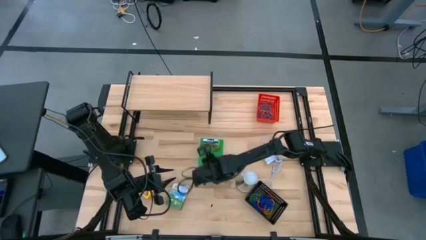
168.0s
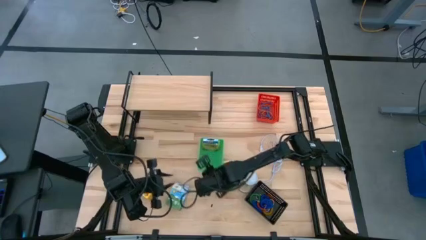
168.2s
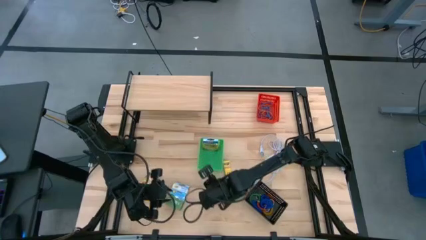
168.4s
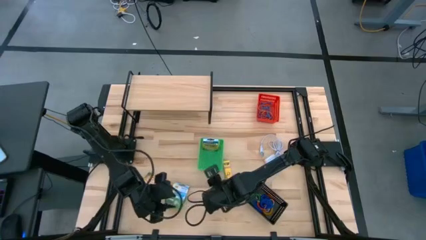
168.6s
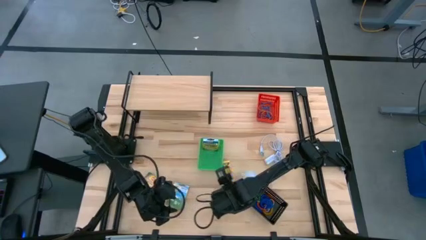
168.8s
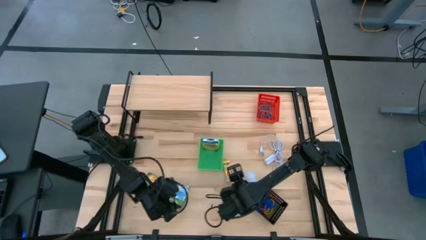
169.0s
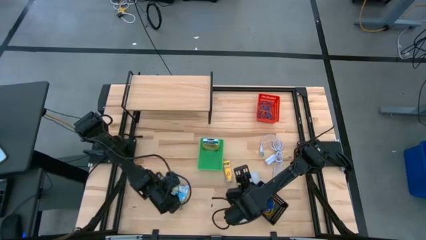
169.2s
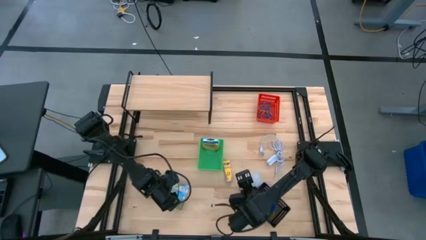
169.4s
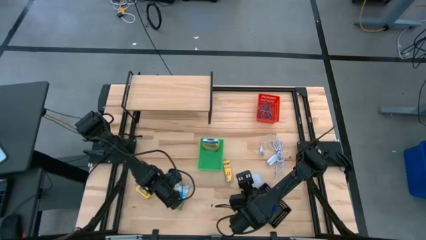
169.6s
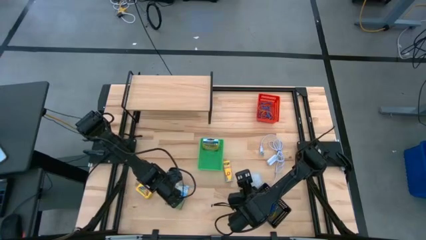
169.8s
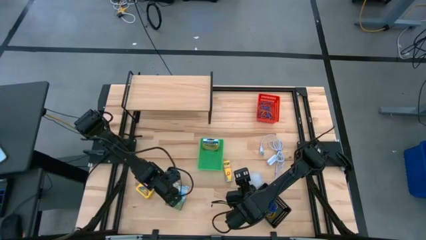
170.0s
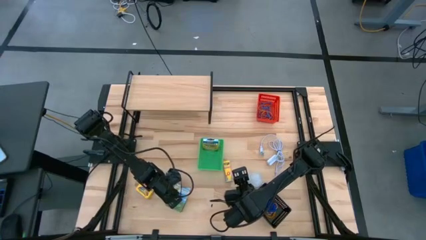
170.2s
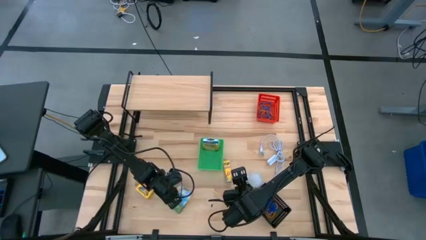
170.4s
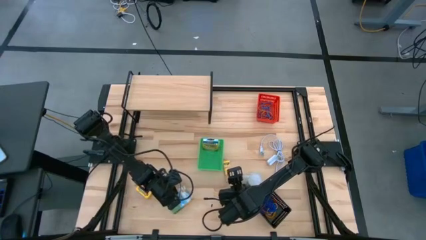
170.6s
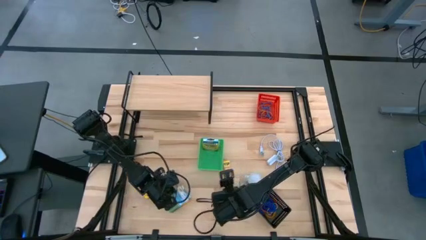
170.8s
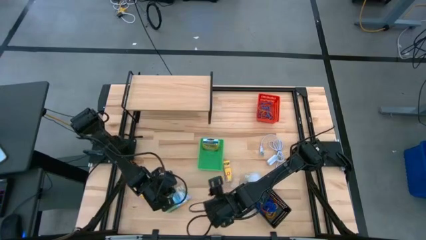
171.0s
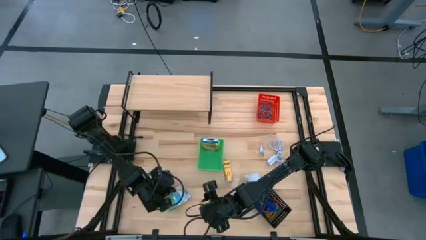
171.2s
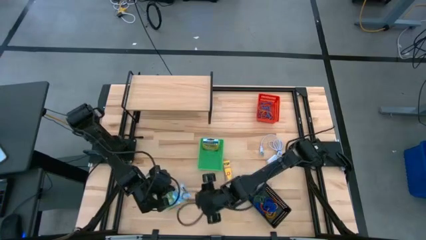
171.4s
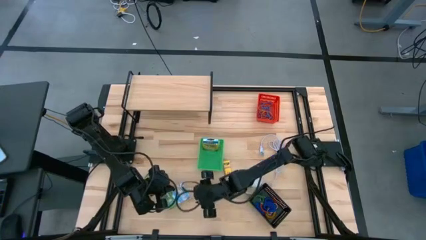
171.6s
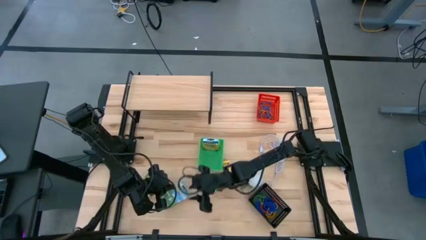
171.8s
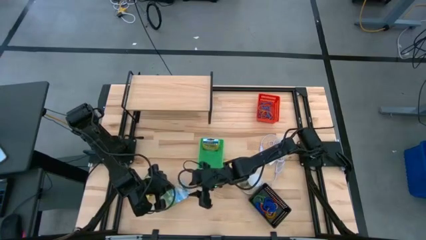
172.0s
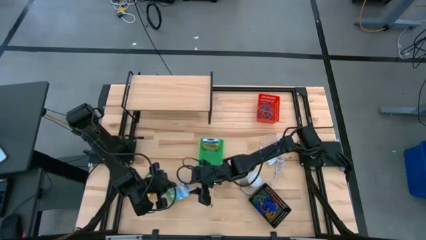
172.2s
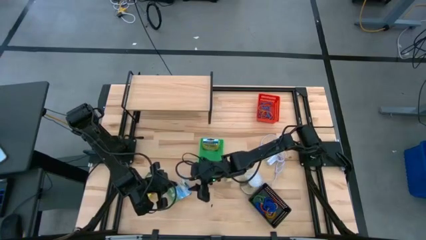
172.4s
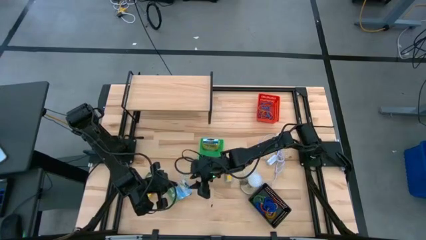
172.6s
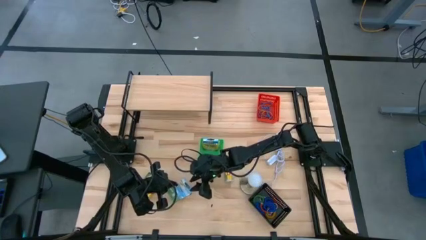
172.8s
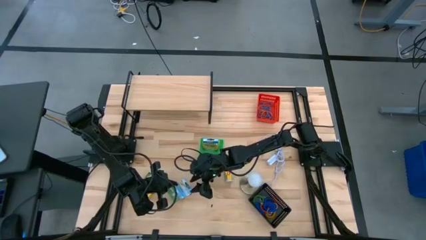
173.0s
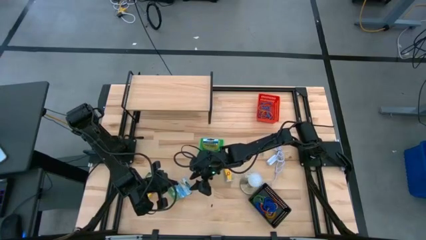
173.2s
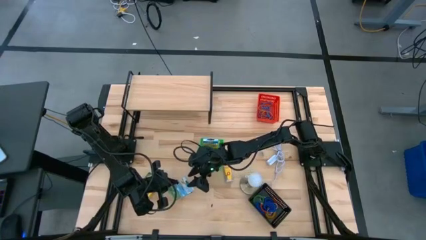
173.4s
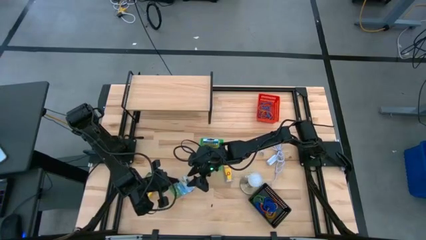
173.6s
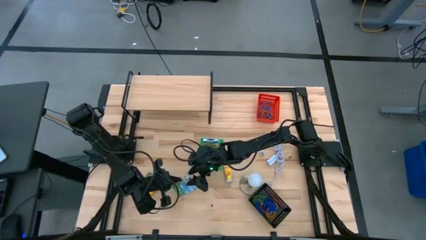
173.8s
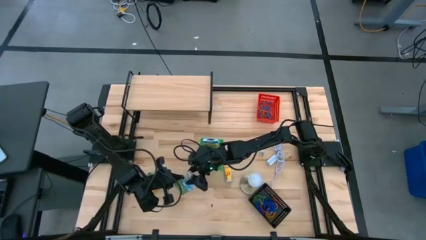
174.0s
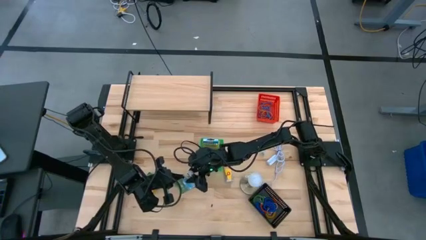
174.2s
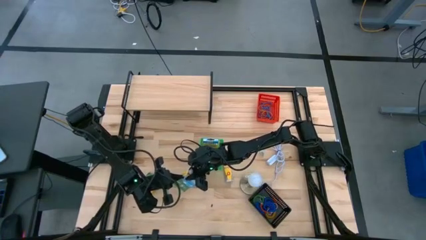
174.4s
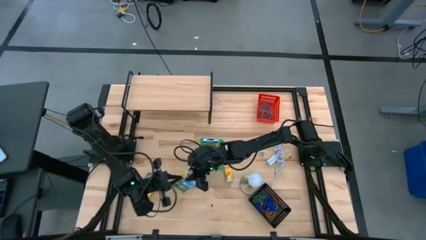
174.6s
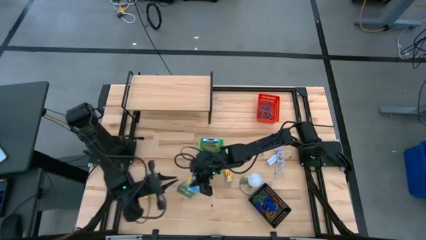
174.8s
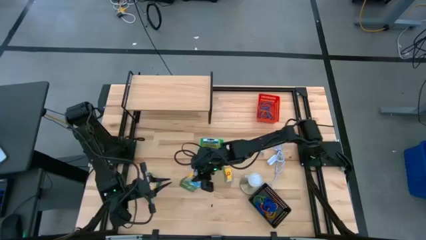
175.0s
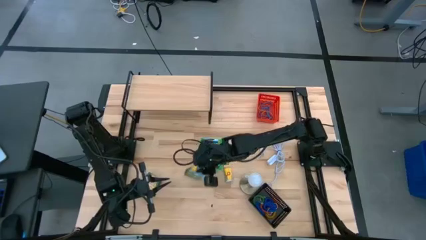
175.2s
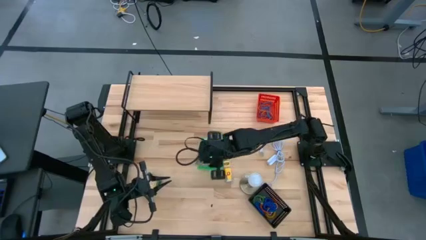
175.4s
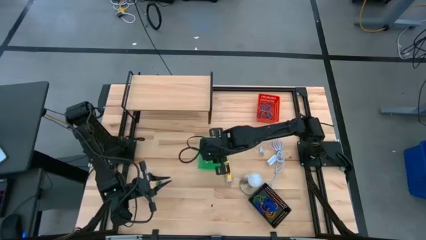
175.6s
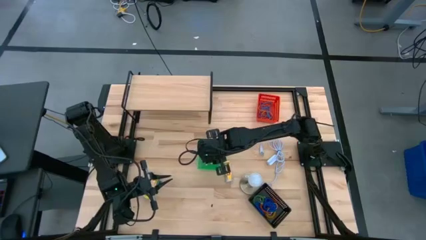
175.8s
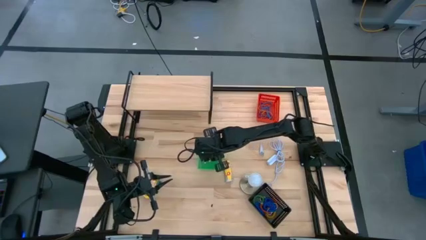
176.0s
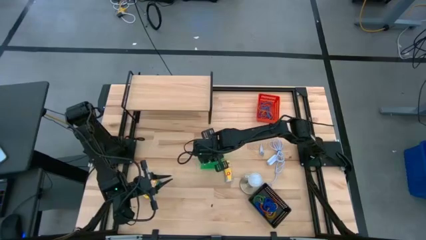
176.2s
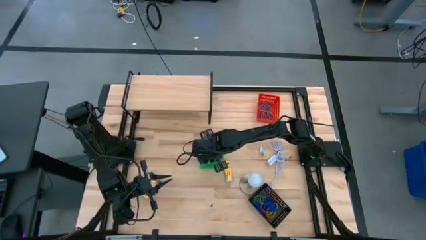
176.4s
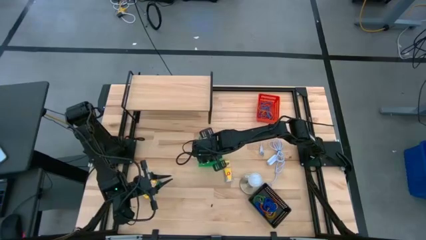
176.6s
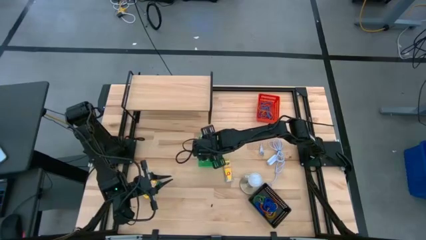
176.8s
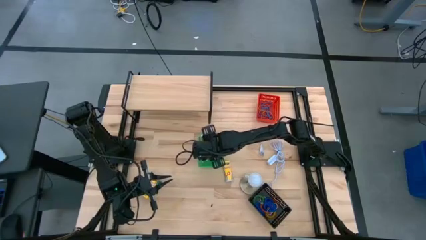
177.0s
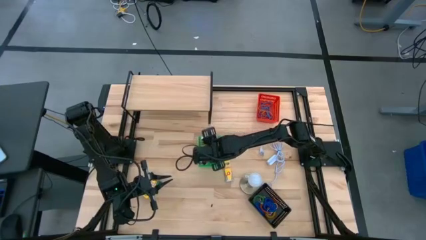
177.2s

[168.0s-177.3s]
Task: Pick & Place Office Desk Supplies
Put the yellow crayon box into the green basket

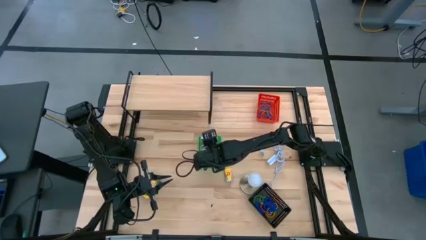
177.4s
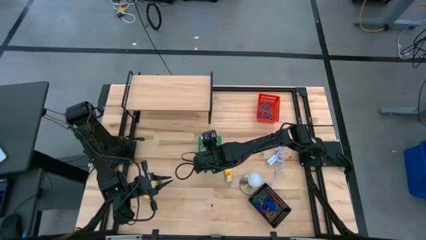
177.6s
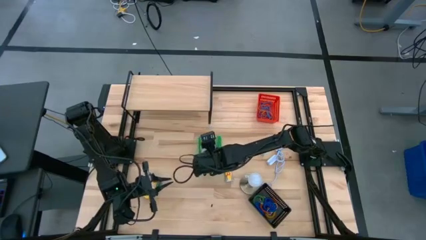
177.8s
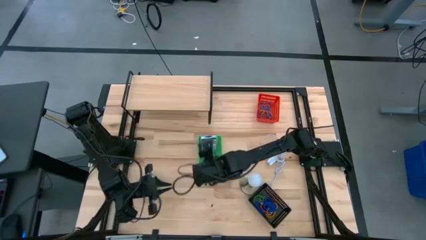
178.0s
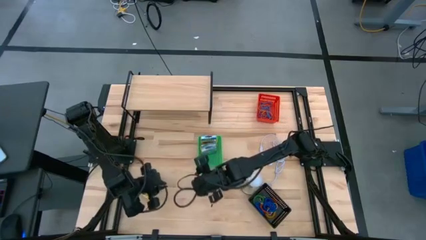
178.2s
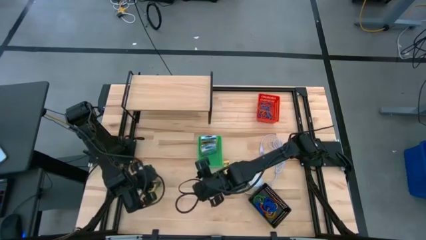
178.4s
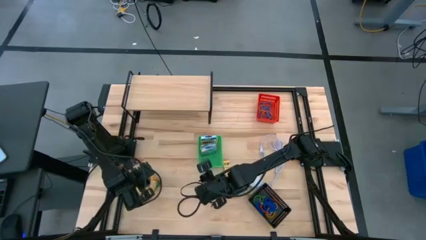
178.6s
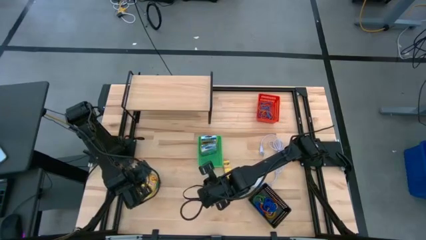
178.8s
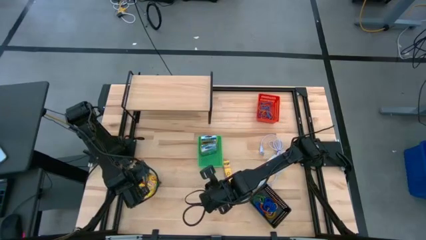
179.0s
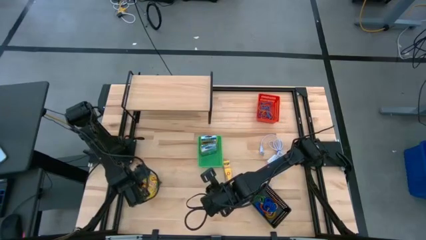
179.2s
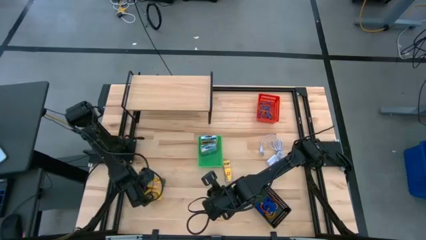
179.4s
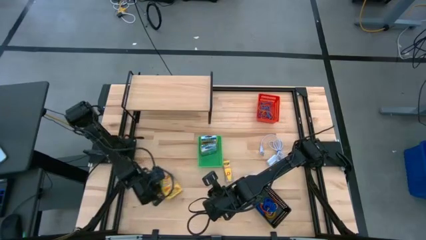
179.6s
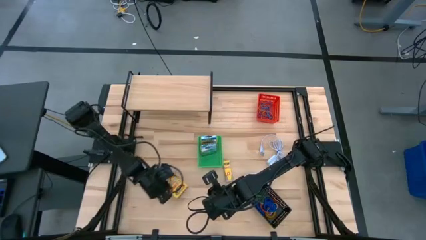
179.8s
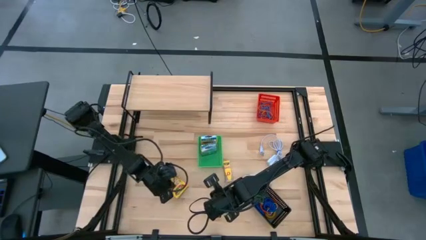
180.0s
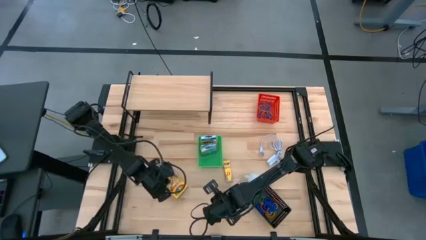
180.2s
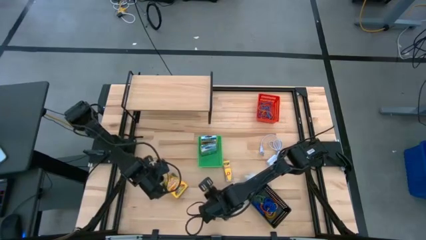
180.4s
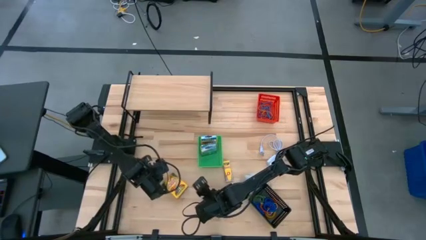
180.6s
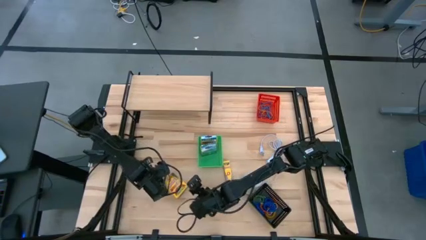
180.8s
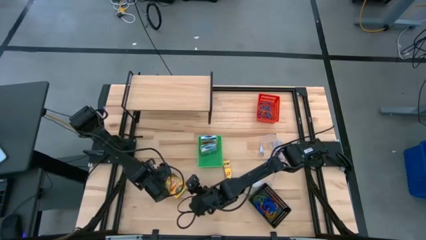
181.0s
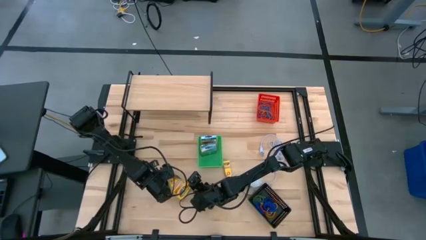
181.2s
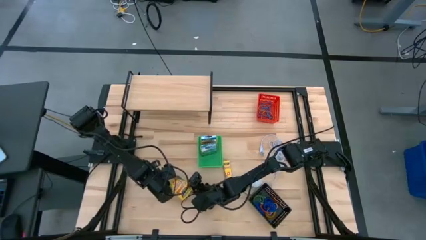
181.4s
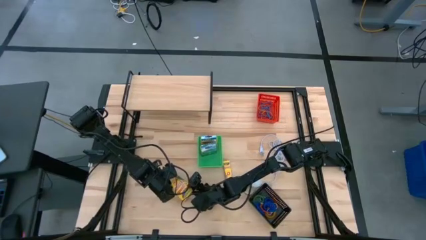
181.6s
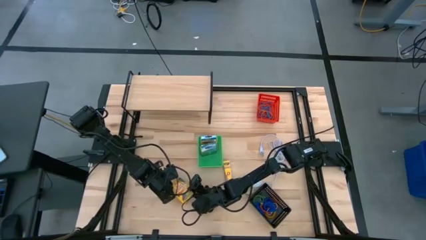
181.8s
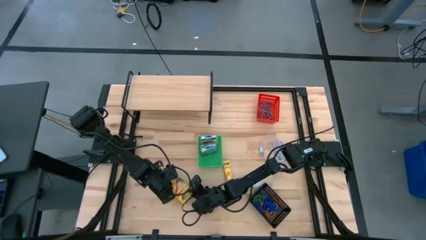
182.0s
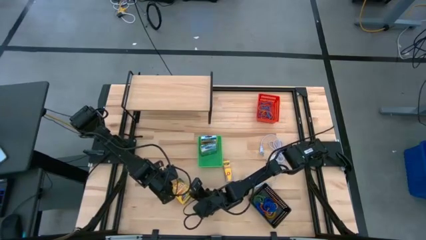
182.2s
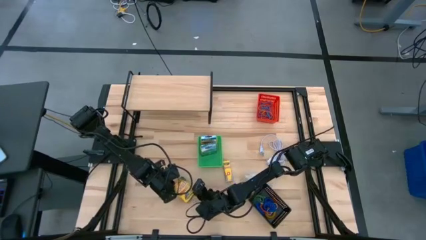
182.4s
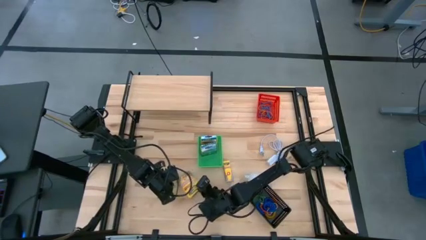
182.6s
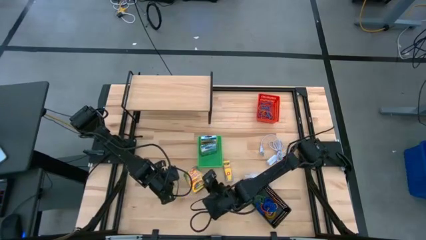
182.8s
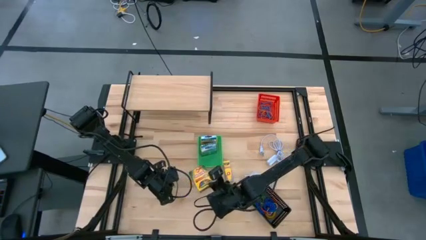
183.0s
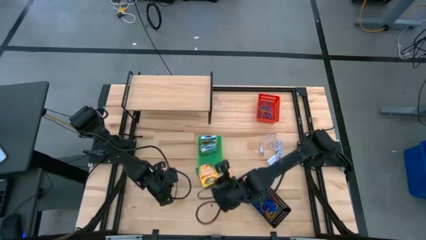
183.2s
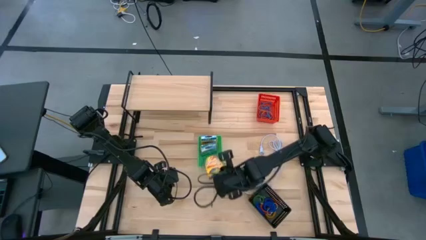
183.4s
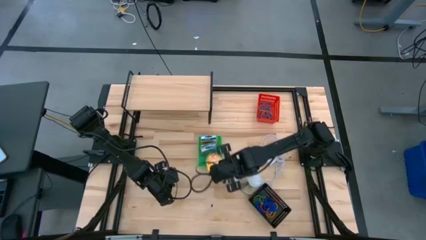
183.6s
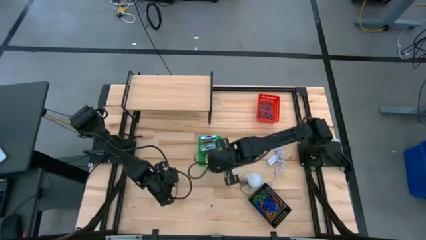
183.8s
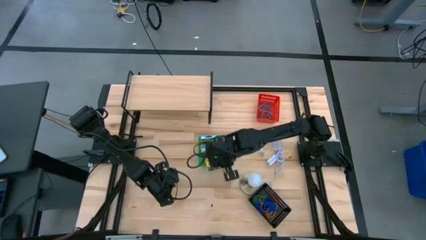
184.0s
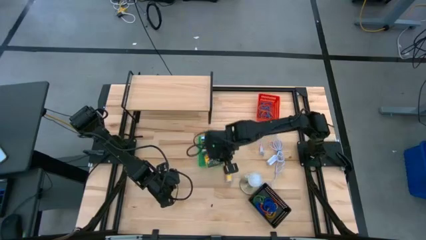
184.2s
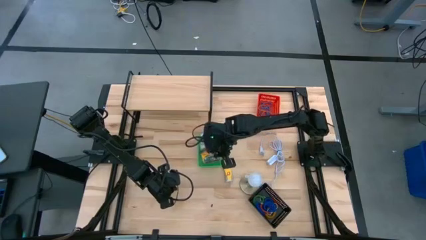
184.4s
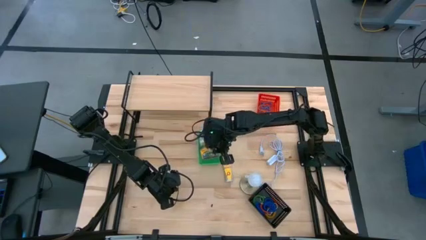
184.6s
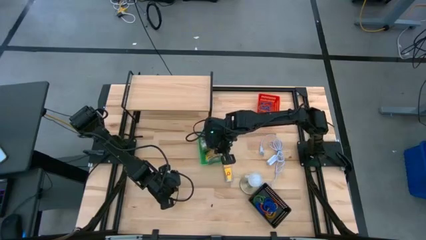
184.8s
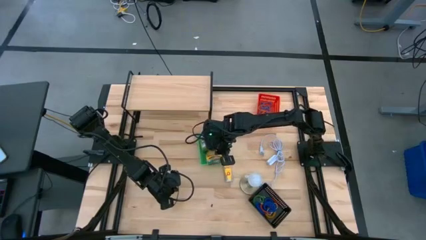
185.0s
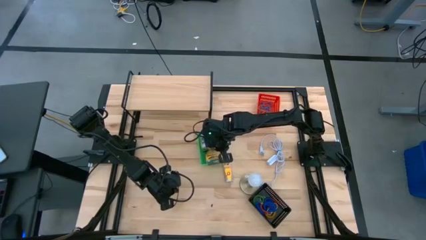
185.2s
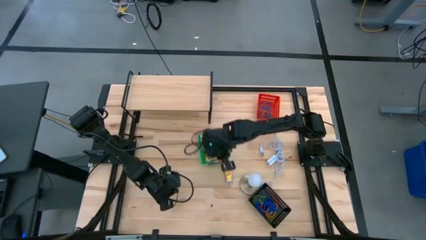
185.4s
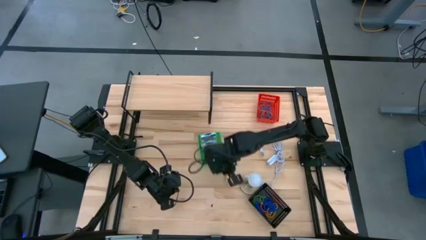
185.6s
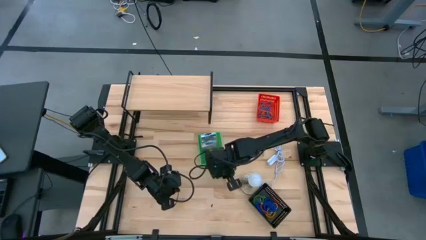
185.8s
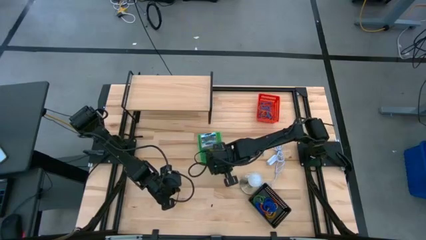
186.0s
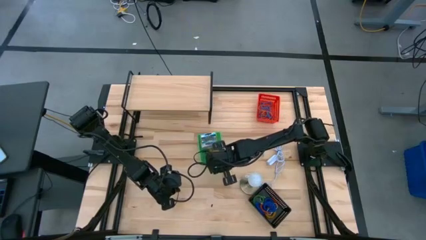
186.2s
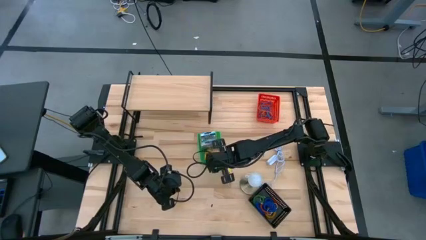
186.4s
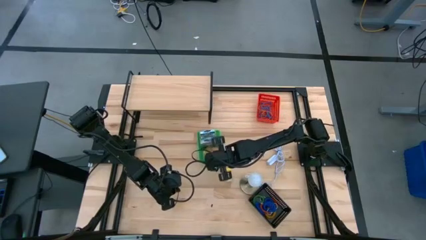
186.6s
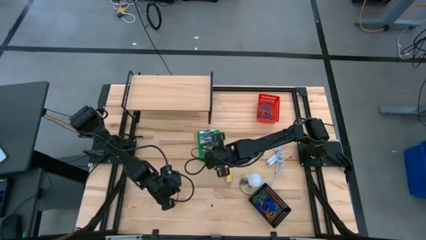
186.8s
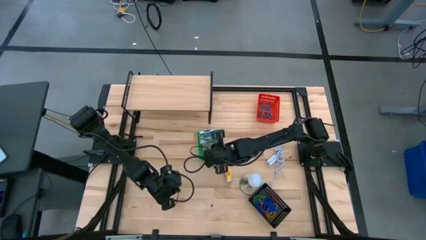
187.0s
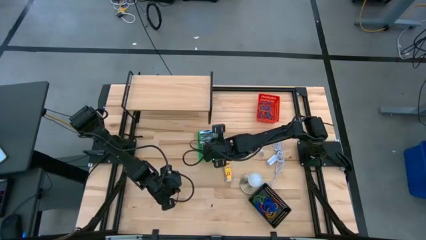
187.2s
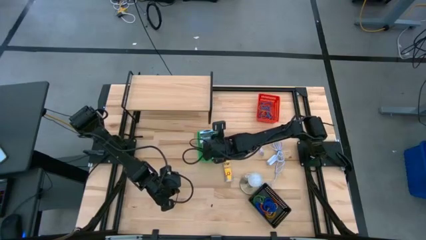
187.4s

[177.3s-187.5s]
Put the yellow crayon box into the green basket
